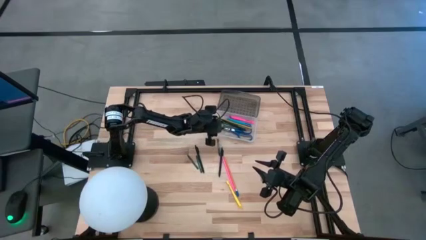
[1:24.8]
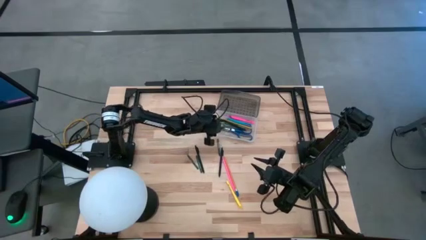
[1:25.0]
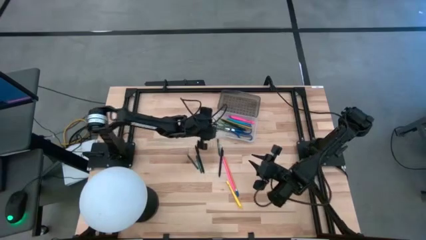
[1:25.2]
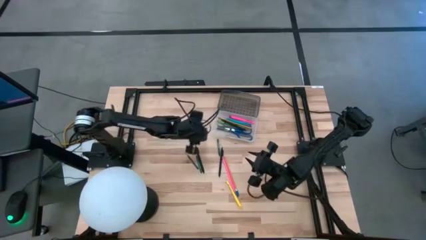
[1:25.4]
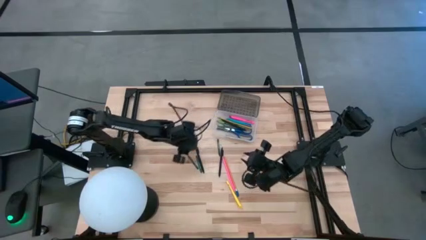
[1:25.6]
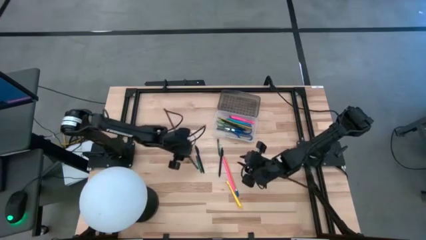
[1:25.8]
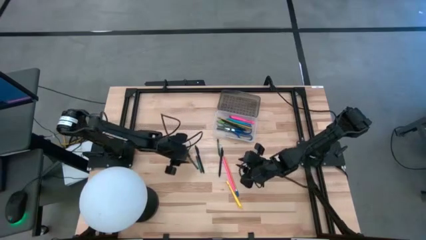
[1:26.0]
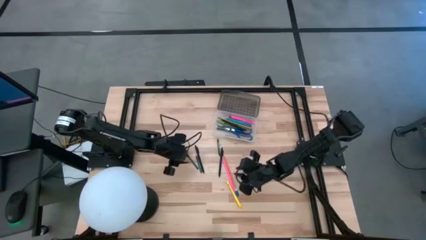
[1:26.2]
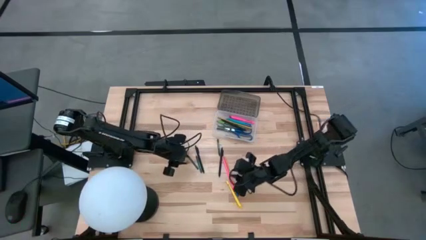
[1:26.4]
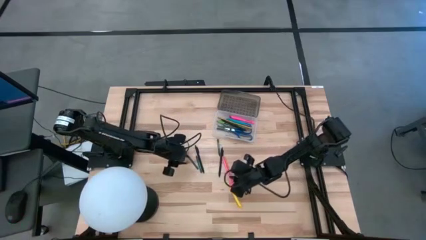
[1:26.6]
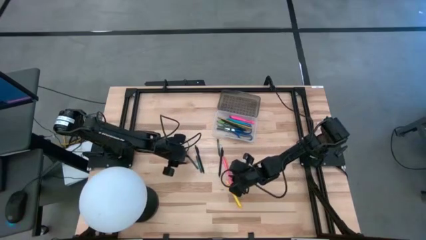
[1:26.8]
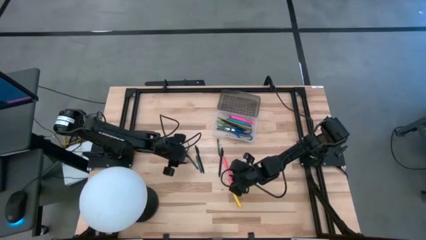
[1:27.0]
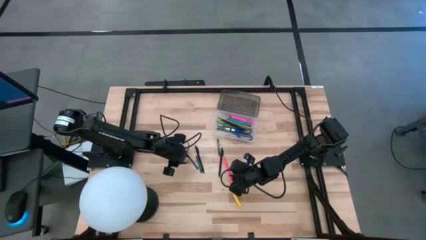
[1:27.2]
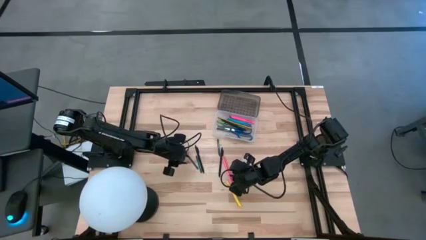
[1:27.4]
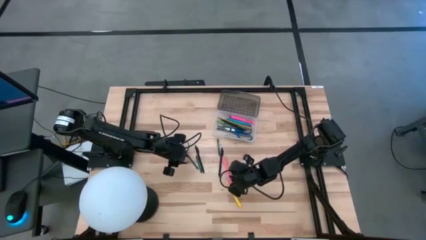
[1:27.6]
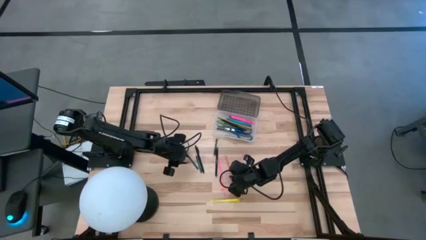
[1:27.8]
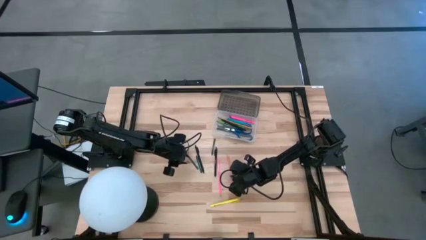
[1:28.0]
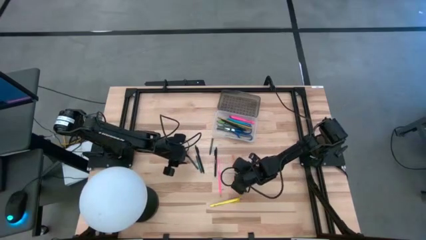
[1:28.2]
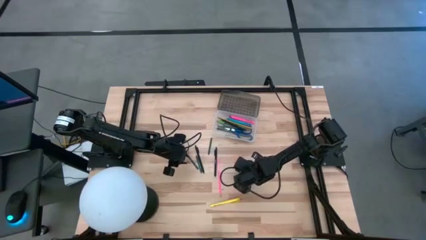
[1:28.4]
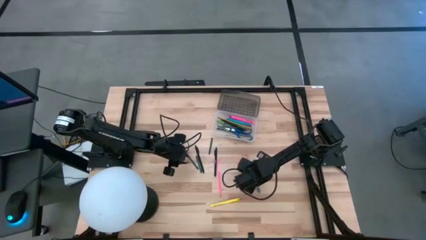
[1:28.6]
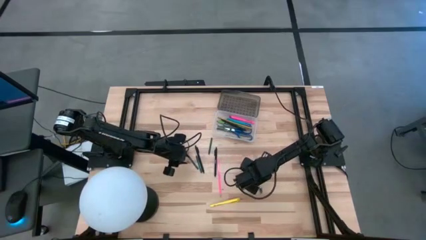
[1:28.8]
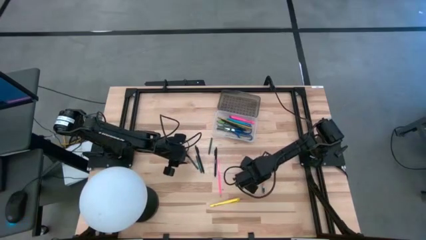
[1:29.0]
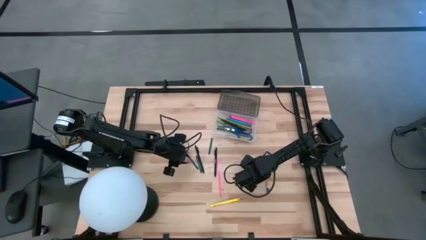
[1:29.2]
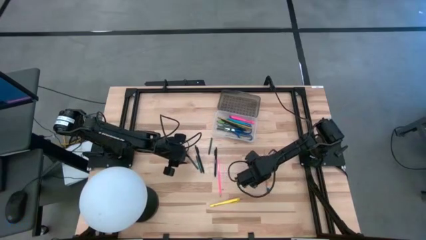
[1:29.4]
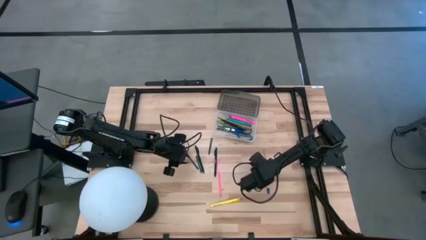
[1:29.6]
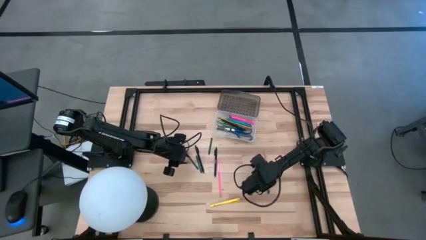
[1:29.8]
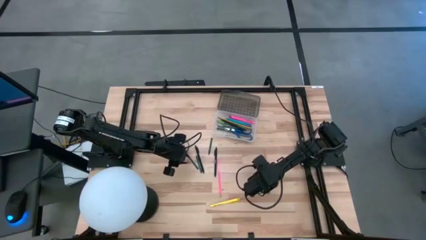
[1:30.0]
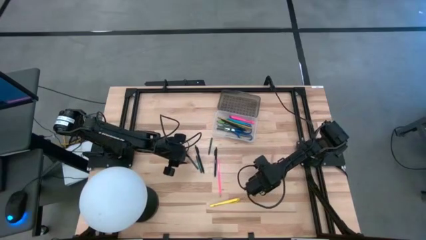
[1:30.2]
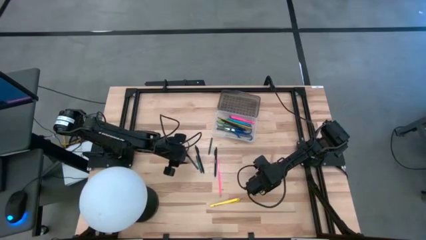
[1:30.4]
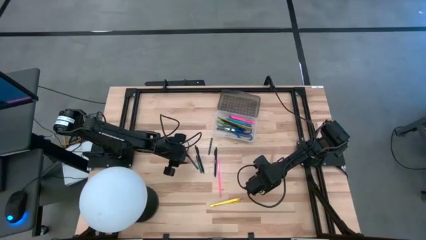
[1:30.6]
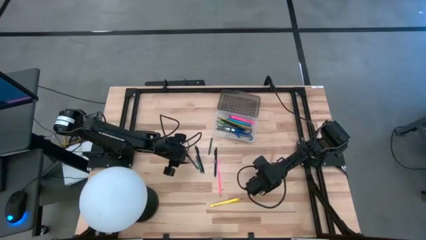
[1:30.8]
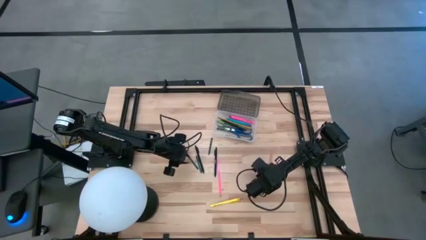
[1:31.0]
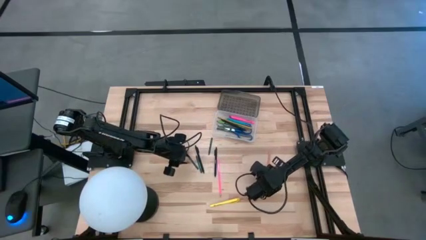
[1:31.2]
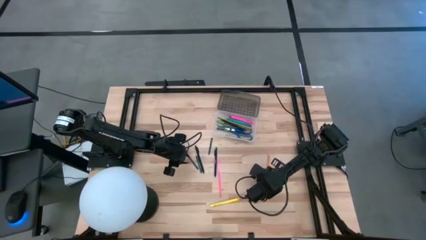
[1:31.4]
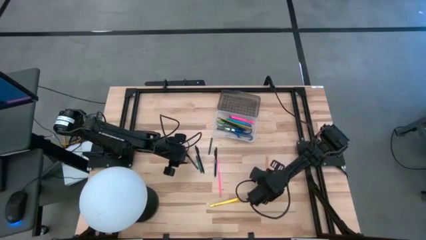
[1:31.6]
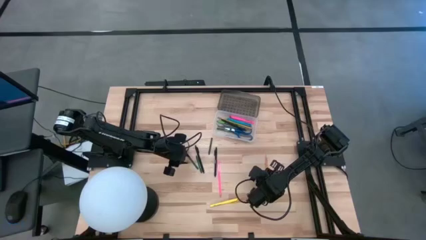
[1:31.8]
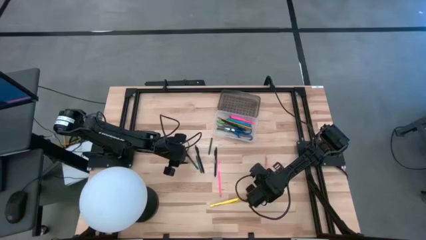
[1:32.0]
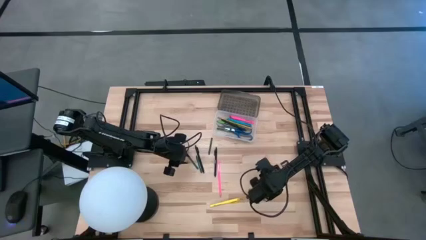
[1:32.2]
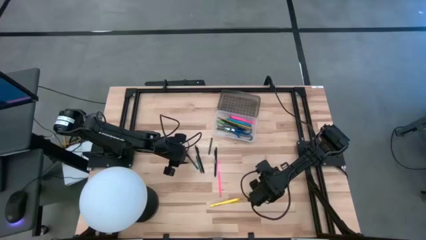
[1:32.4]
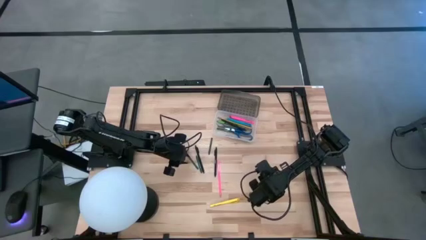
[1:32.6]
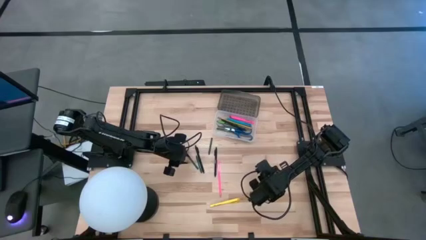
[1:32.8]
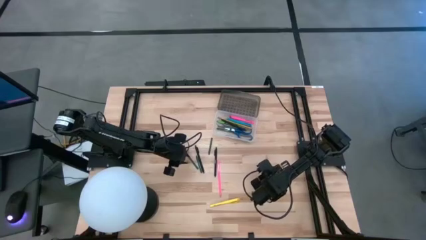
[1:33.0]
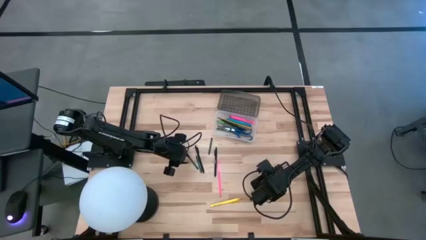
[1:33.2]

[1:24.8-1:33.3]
Task: Pick & place school supplies into a supply box
Put the orange pencil into the black supply box

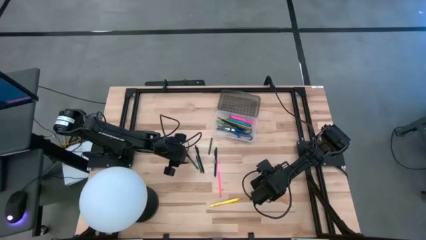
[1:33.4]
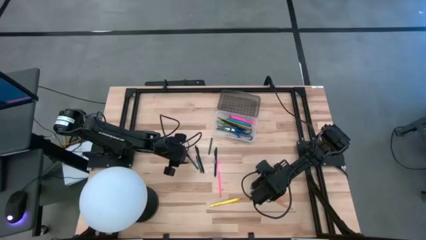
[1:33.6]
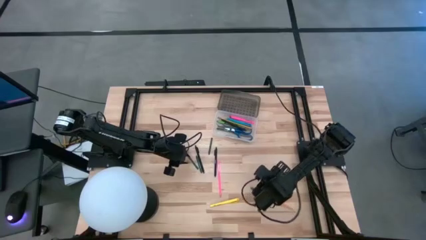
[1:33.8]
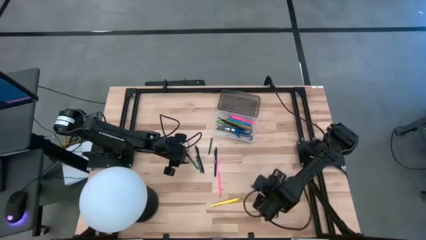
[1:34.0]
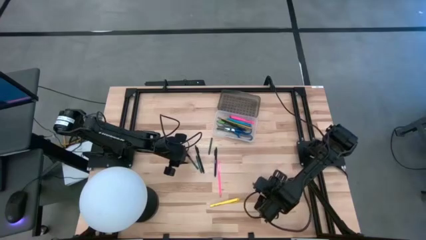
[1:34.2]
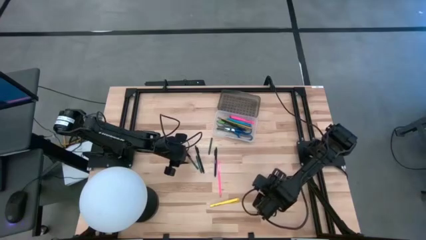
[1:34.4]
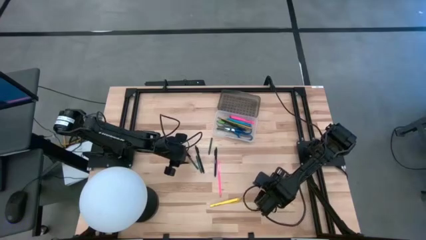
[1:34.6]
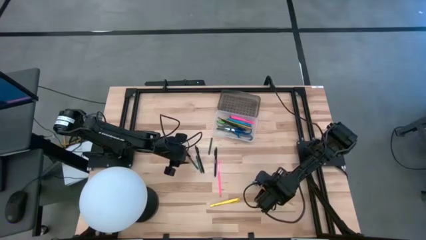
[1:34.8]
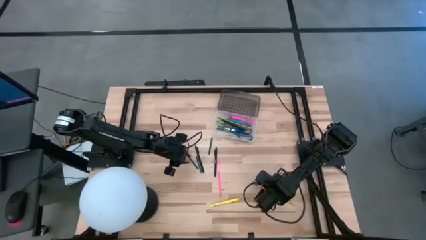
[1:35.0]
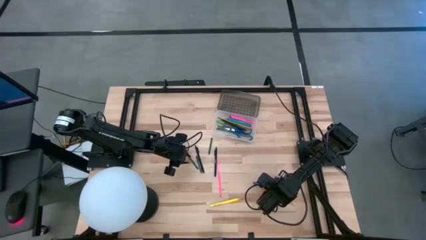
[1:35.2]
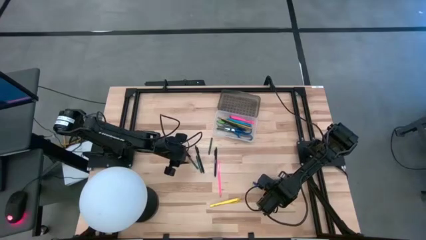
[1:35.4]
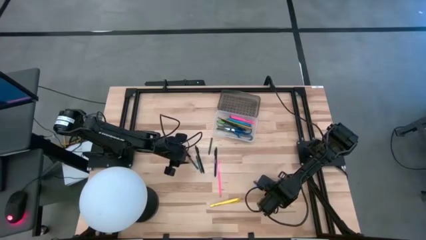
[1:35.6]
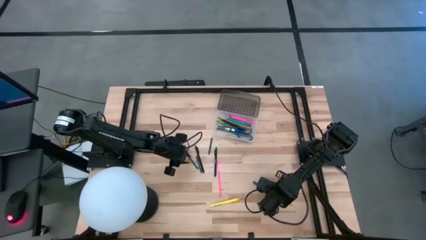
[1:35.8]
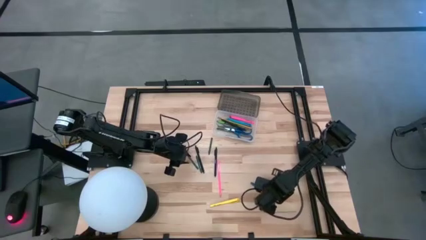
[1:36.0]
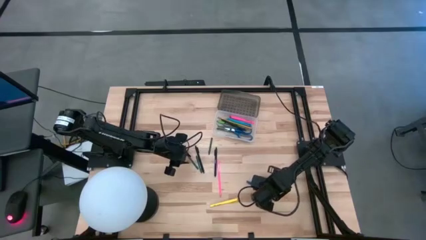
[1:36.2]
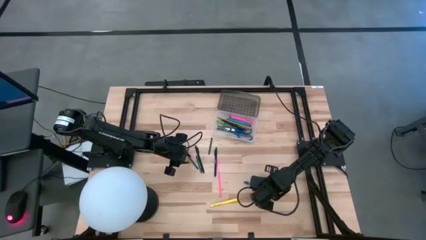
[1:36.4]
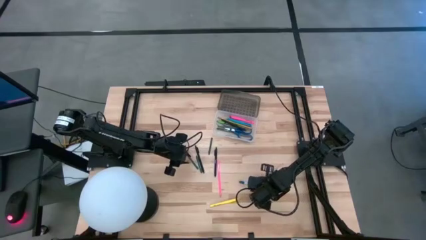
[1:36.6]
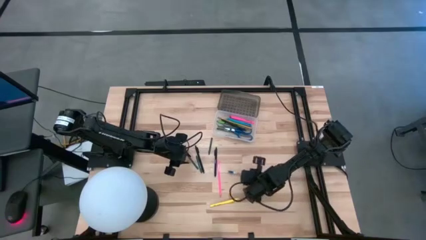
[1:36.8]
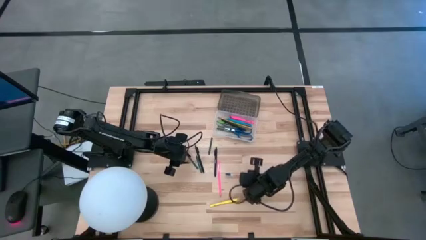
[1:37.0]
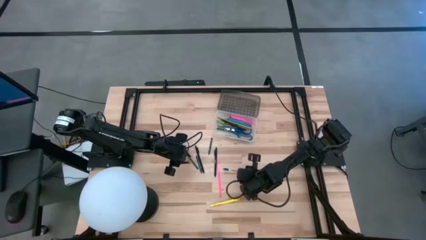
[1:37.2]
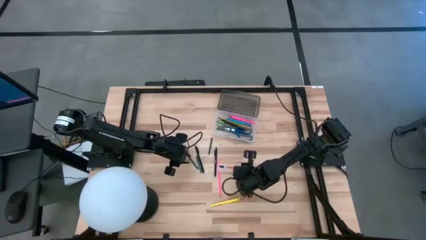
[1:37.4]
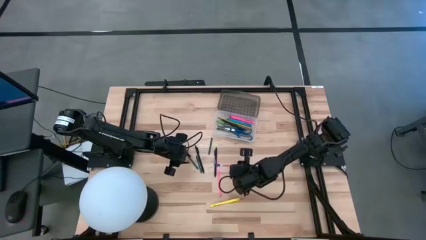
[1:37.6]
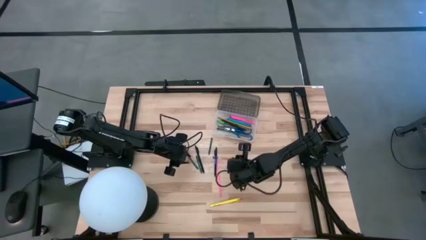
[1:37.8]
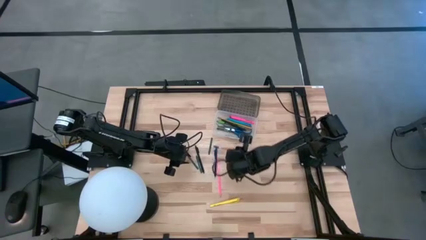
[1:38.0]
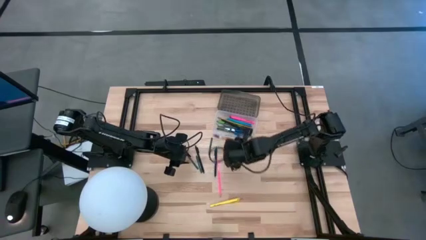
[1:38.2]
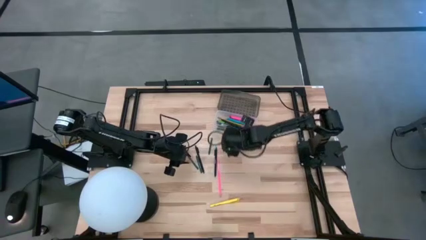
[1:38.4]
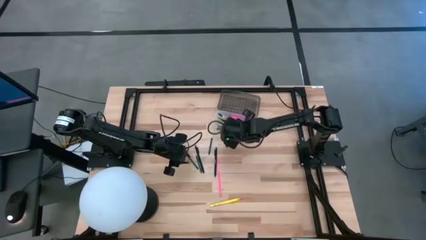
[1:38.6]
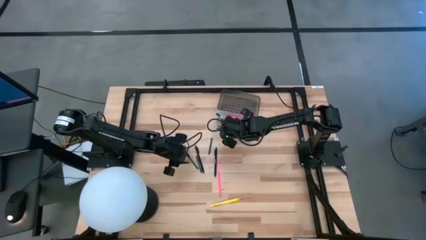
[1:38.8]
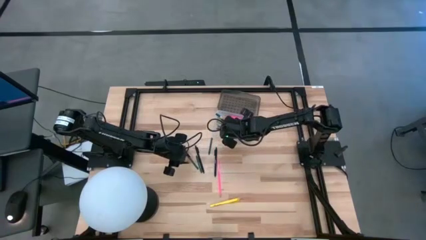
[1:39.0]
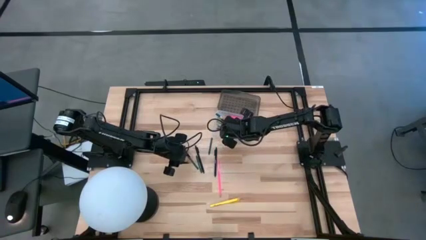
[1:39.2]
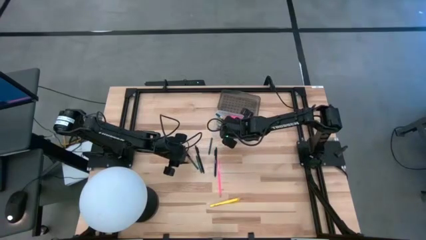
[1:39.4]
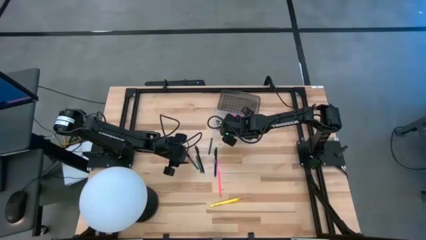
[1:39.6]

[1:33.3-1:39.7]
Put the orange pencil into the black supply box

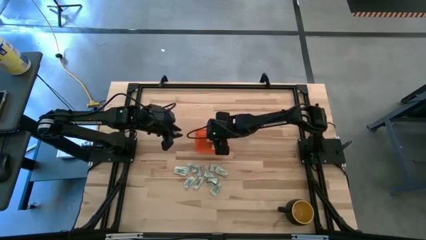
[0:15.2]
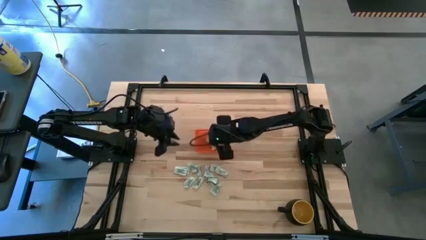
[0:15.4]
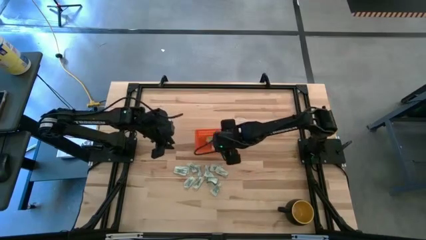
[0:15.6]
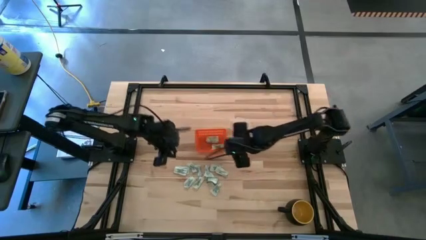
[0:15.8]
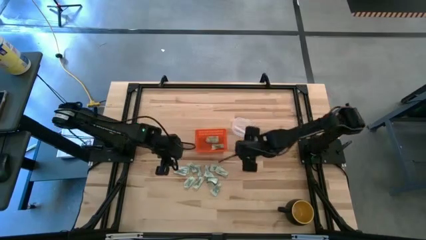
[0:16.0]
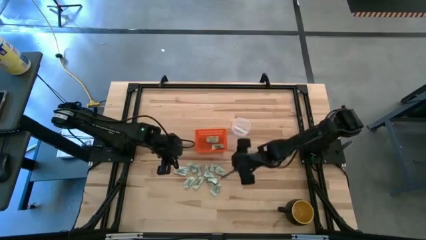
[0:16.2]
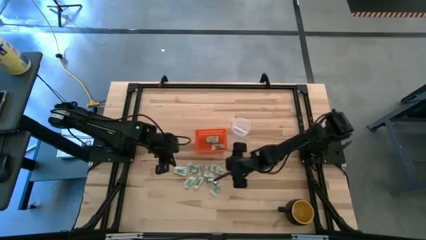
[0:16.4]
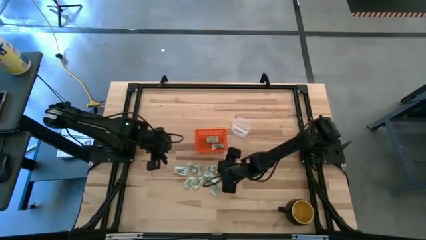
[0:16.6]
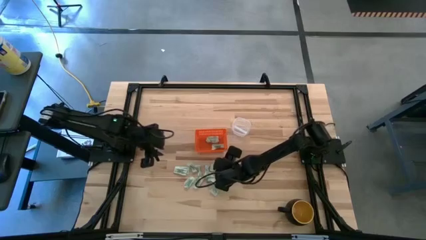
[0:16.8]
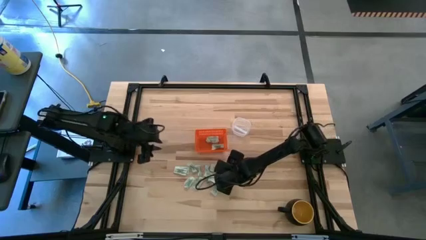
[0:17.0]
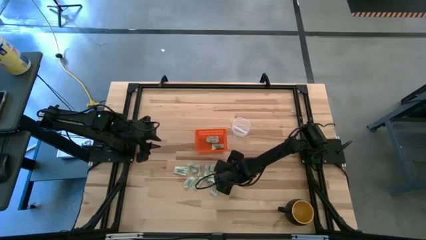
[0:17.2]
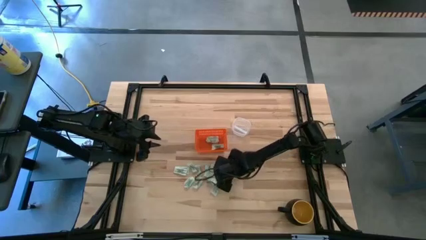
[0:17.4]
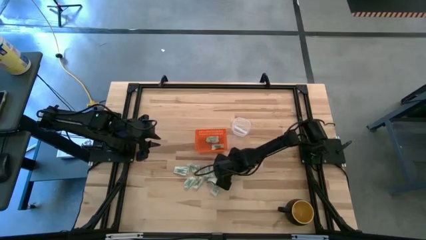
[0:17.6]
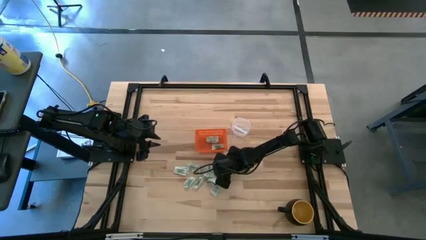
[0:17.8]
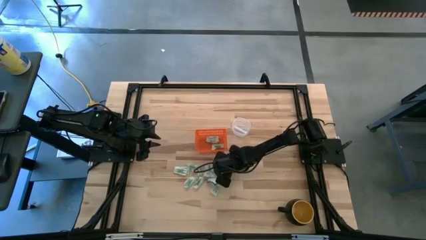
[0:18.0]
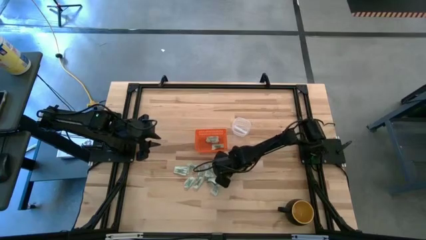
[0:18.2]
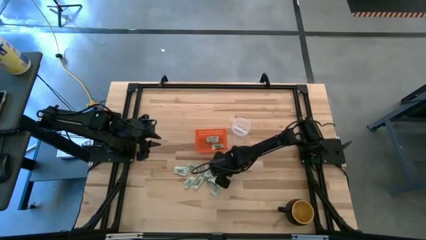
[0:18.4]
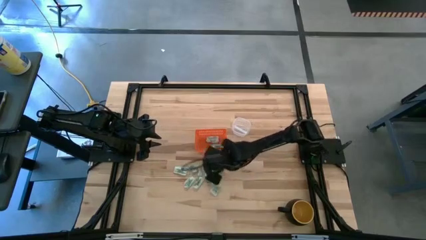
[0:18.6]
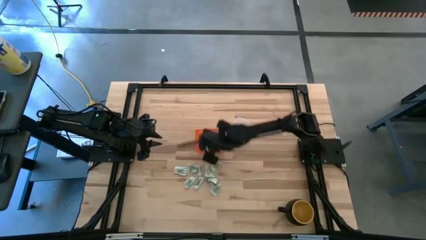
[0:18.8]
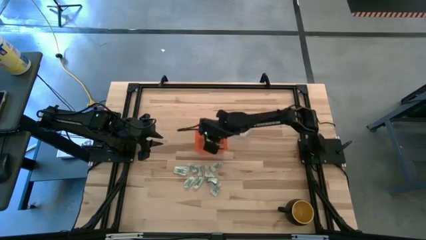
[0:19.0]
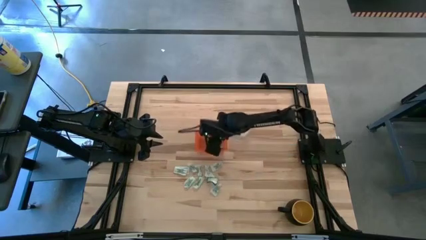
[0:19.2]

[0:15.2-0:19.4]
Task: Pick and place Stevia / Truvia into bins
Put the stevia packet into the basket
